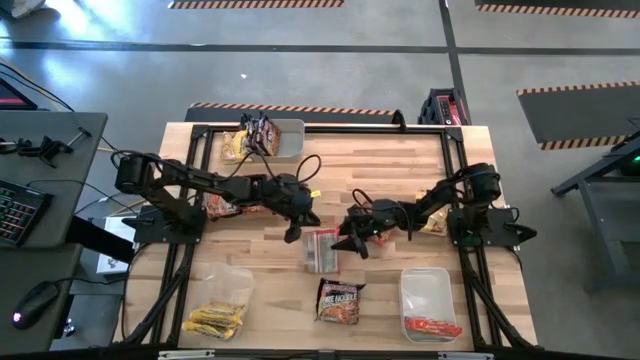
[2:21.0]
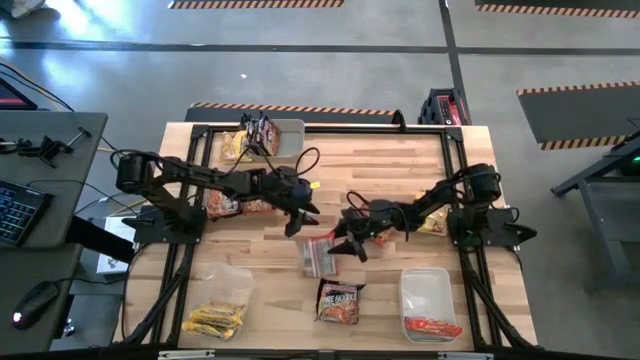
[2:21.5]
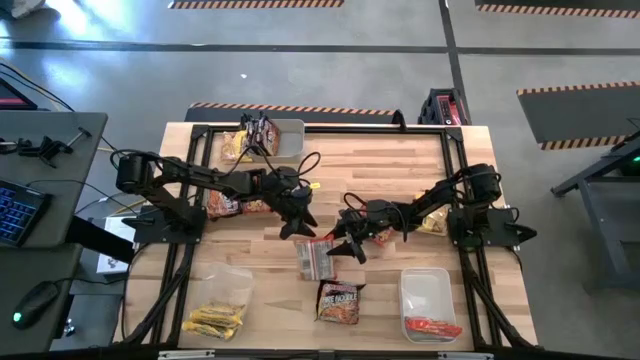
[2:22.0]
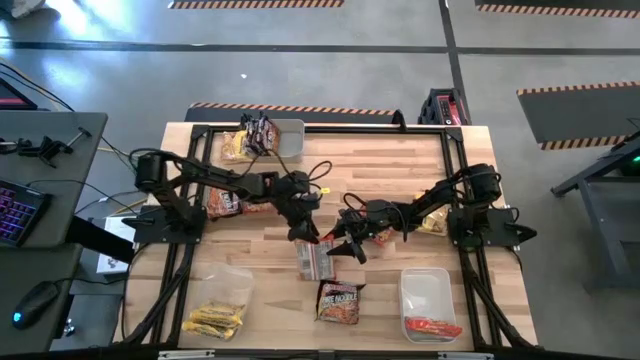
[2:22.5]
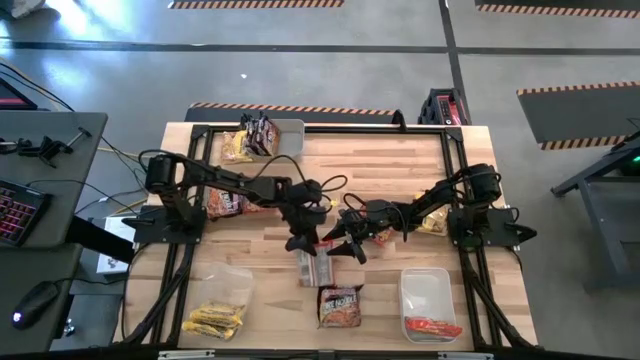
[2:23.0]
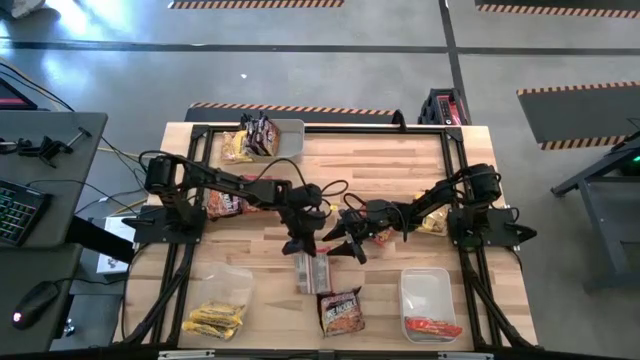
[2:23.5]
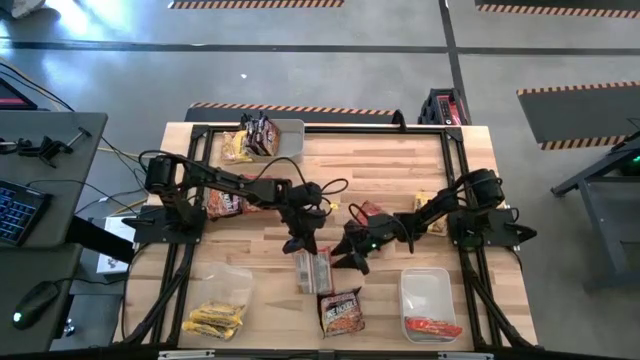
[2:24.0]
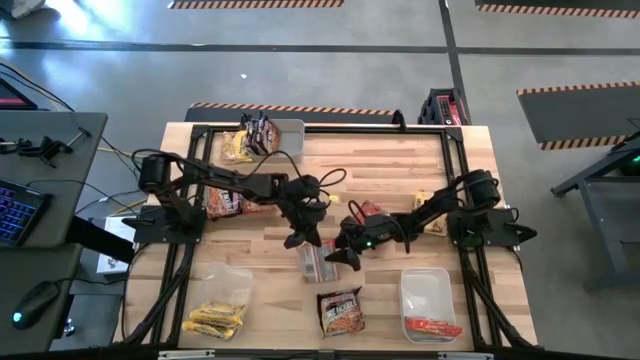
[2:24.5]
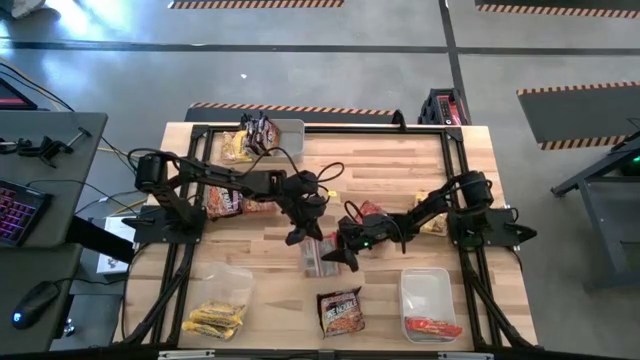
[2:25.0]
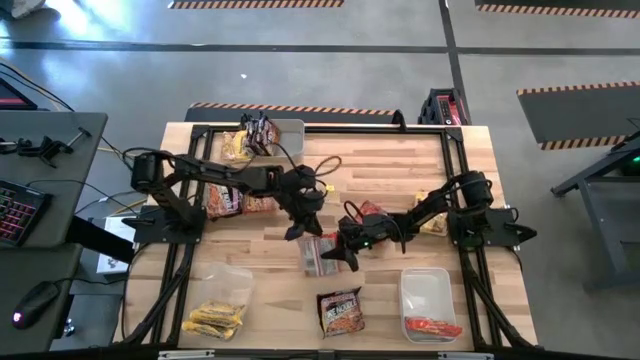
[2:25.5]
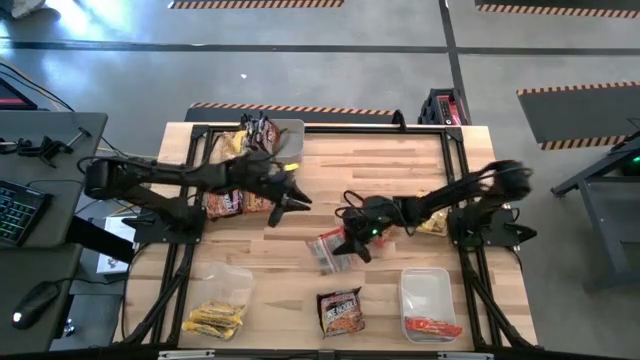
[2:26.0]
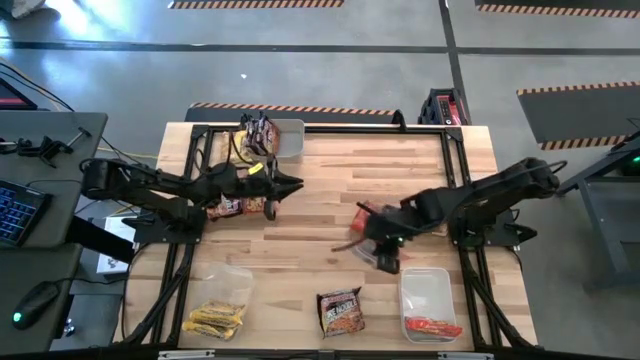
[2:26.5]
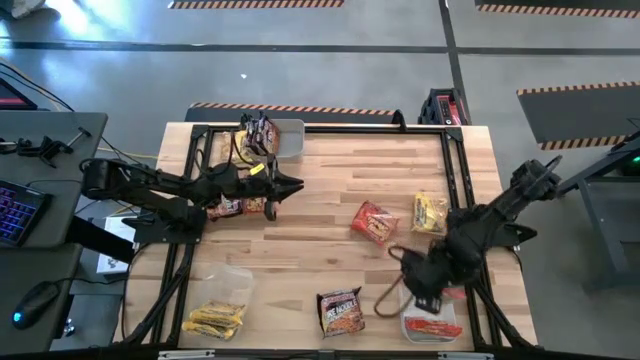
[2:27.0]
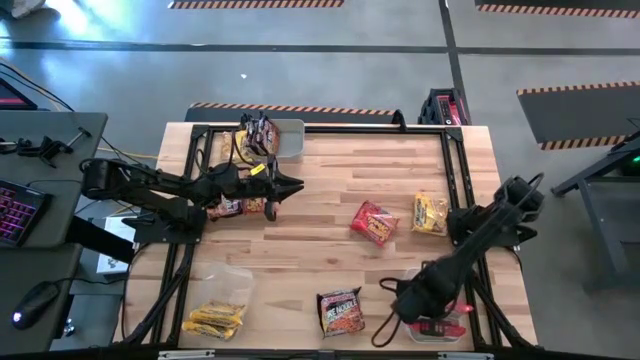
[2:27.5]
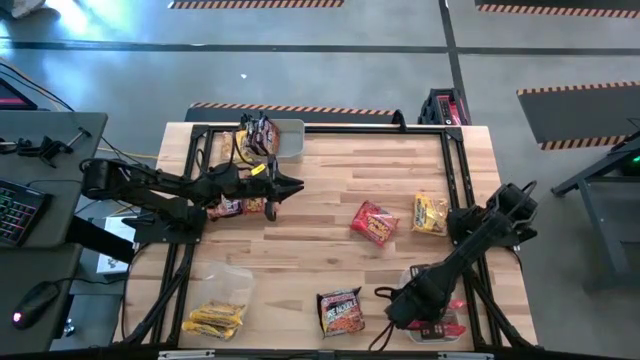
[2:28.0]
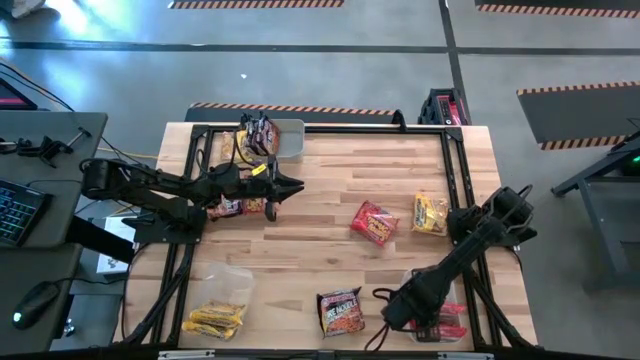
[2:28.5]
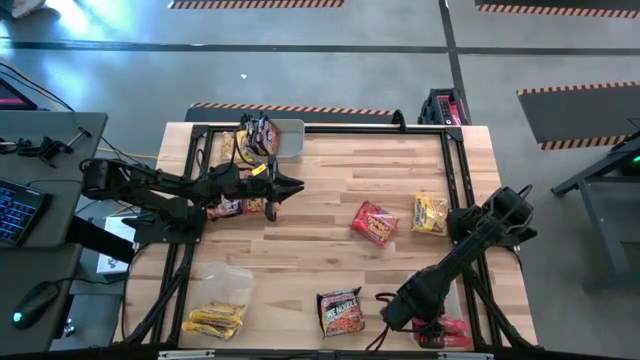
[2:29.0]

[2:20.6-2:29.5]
Task: Sort Maruchan noodles
Put the bottom orange noodle pack into the white bin

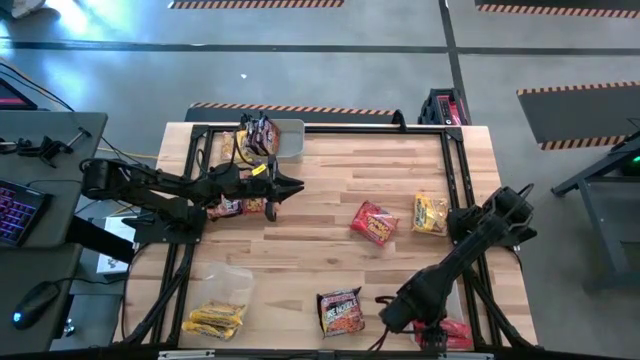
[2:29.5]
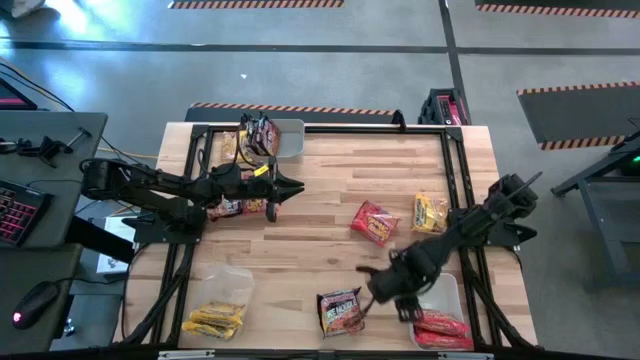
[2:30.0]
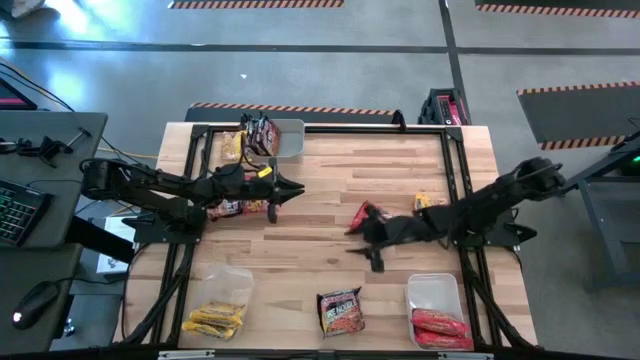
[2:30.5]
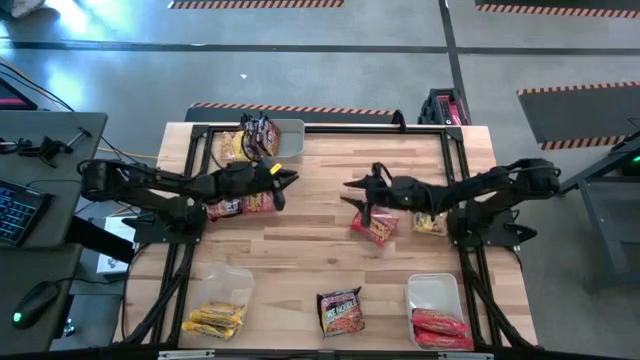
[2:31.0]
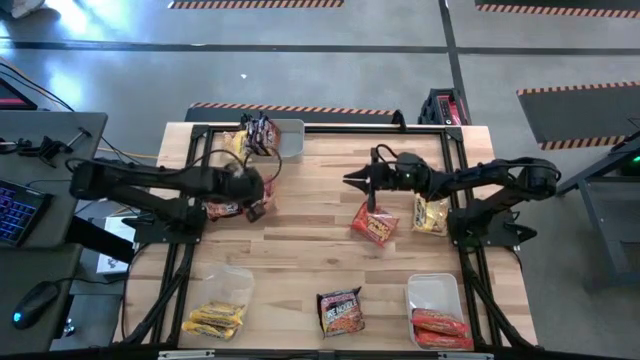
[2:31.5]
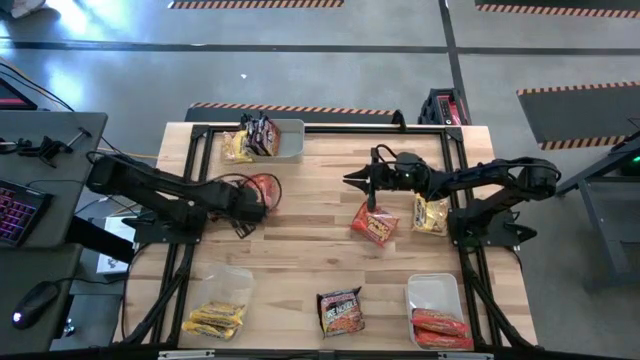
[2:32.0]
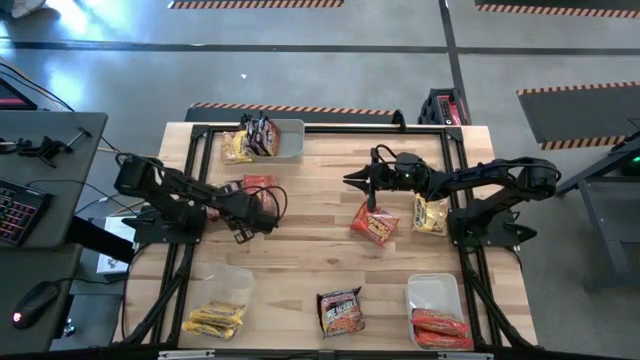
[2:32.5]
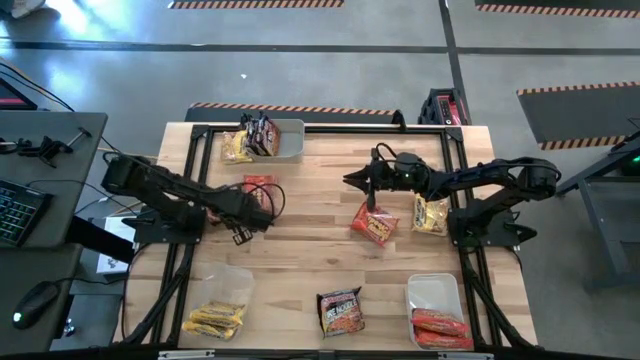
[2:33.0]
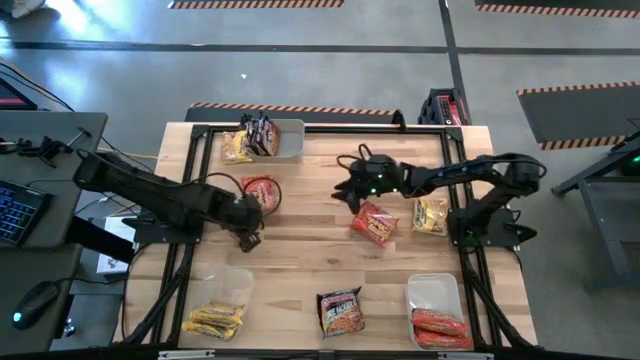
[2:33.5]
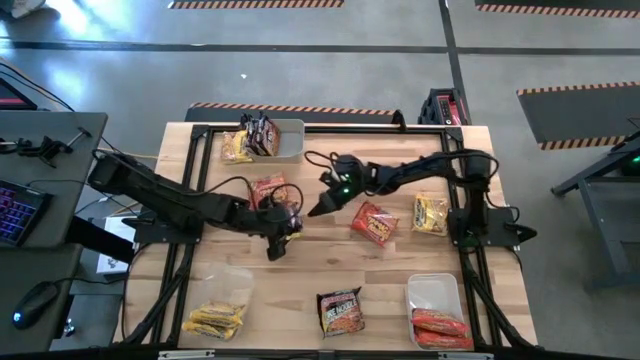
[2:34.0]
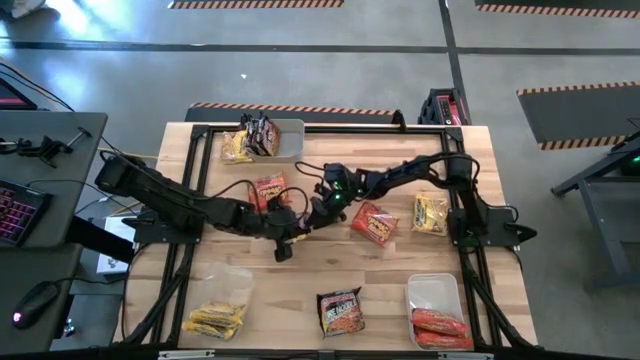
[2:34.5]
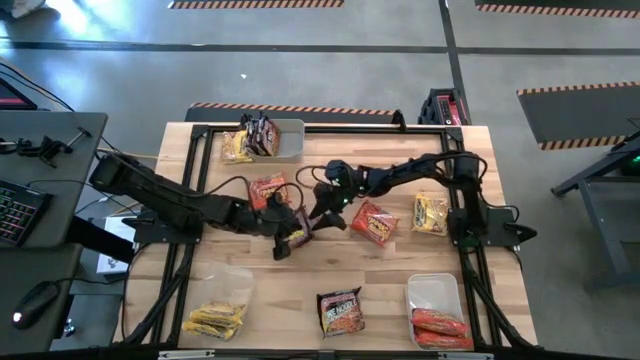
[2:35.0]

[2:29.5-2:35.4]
Put the top black noodle pack into the gray bin

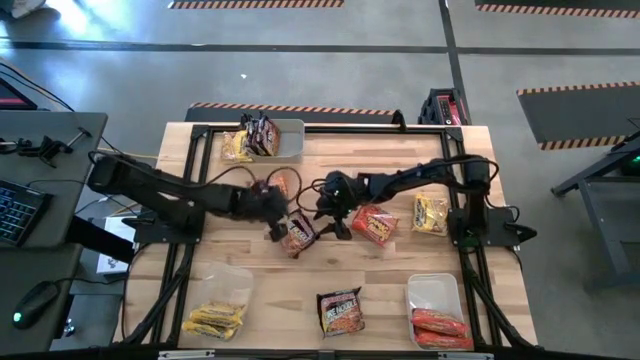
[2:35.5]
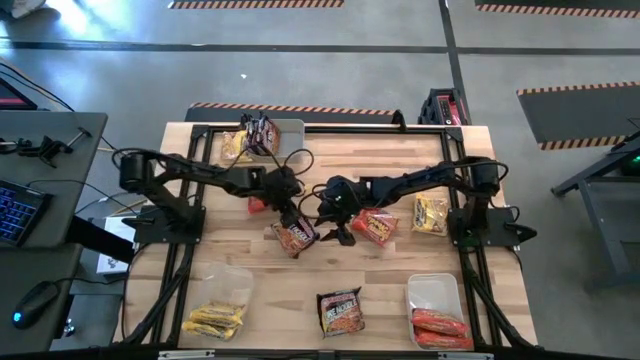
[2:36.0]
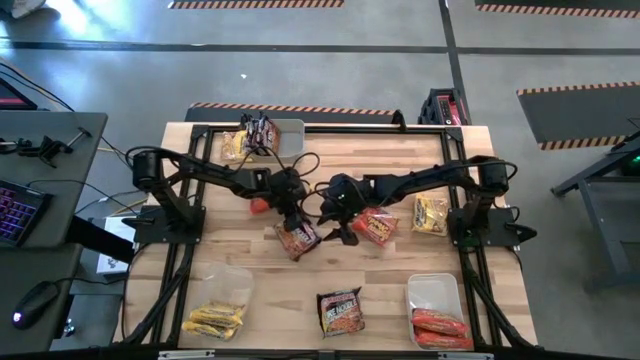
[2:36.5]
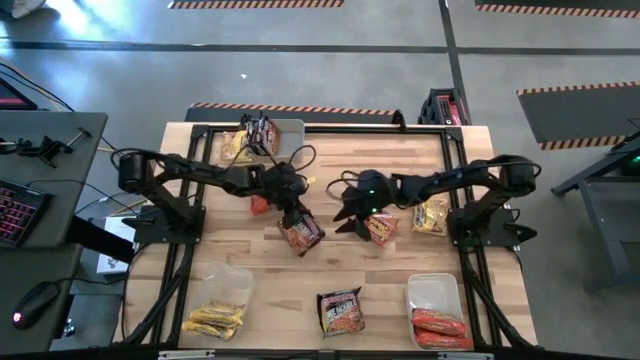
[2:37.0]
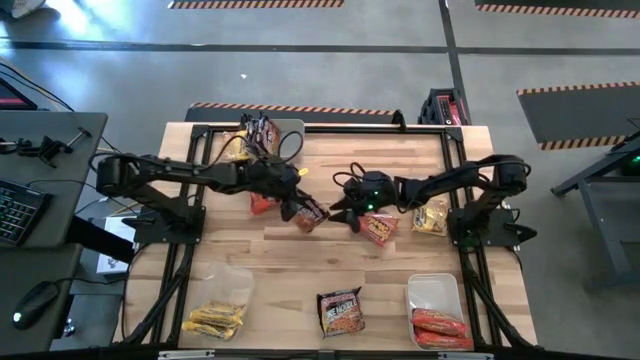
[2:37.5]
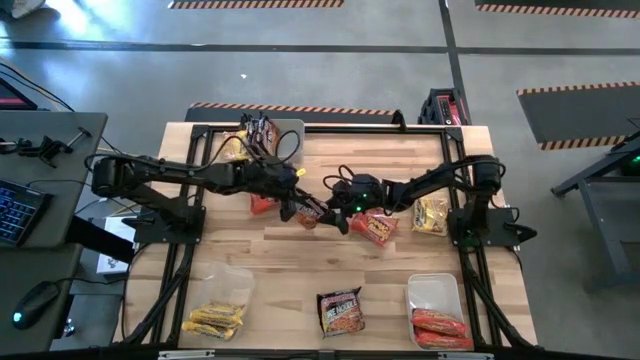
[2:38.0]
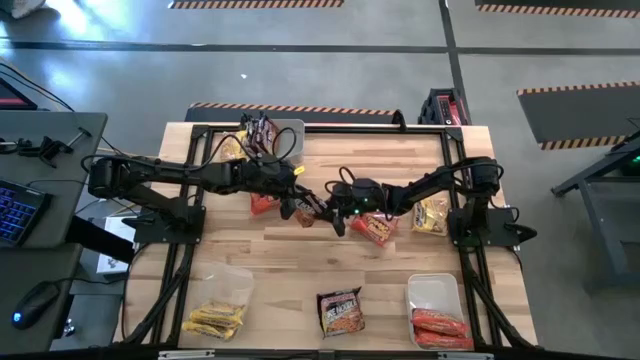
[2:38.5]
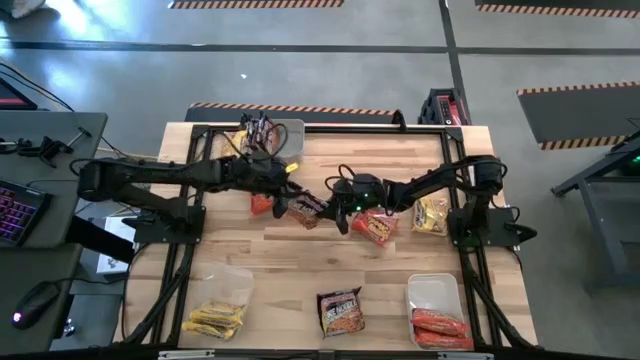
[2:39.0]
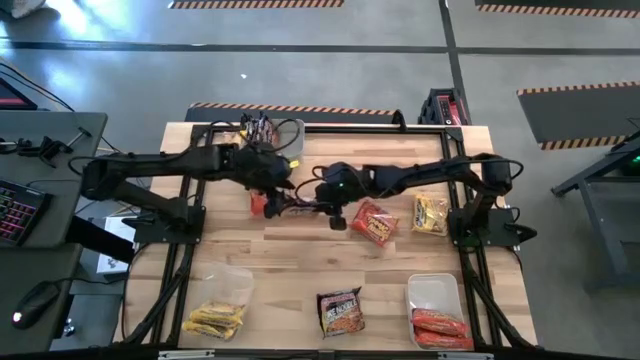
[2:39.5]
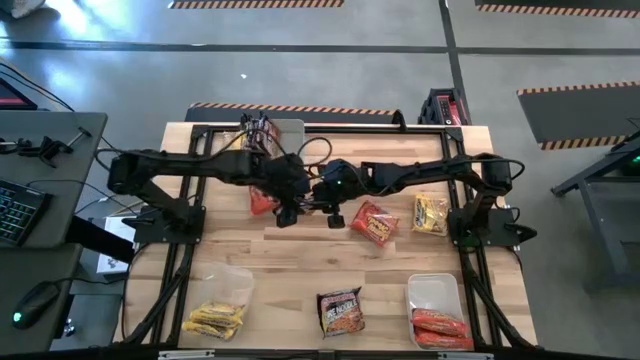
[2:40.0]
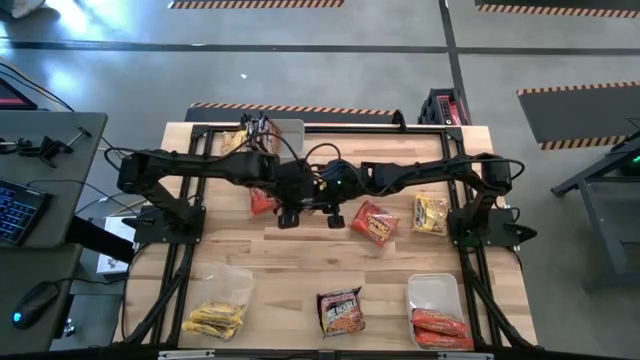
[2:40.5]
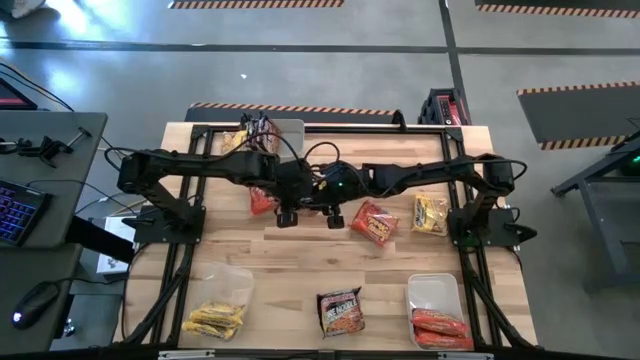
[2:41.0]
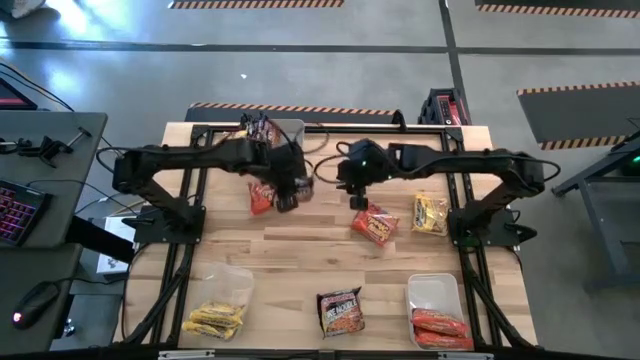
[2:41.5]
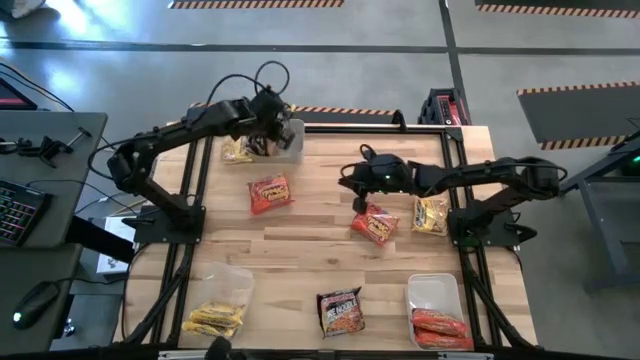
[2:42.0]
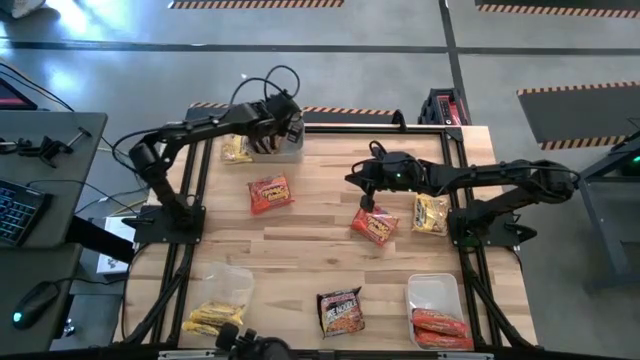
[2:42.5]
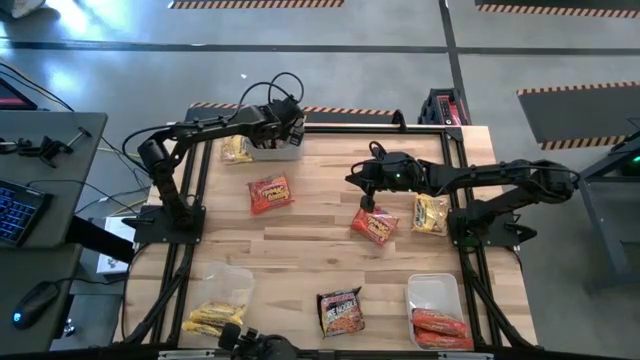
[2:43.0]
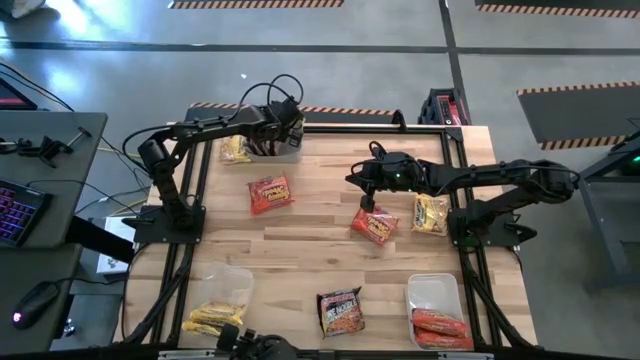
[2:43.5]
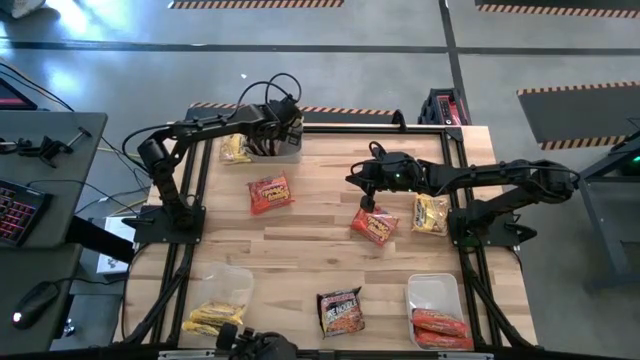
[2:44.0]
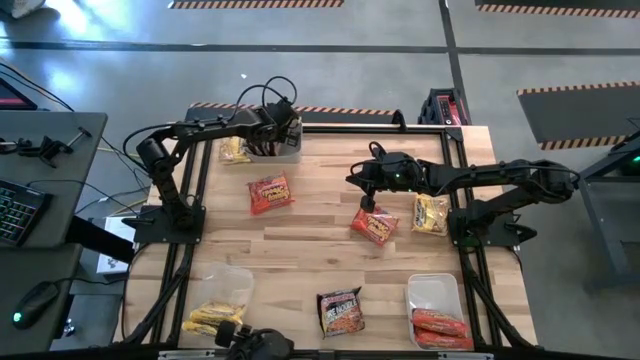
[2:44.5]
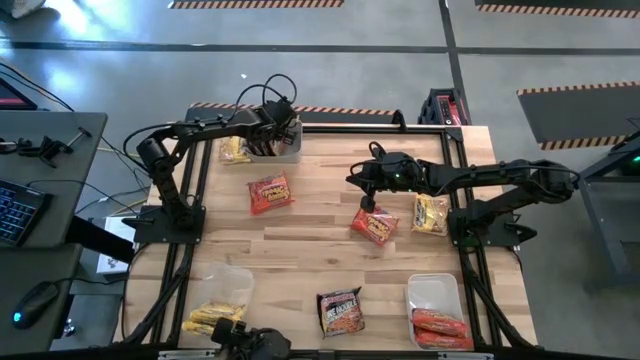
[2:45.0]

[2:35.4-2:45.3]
Put the top black noodle pack into the gray bin
